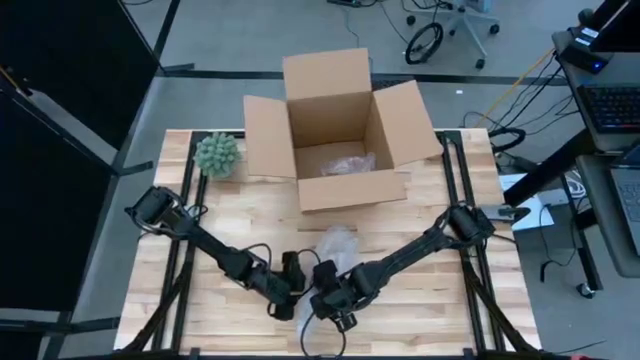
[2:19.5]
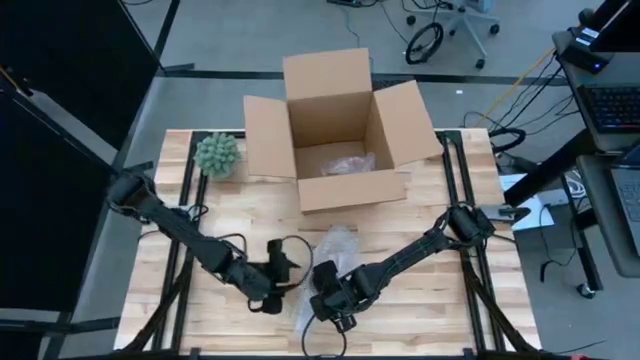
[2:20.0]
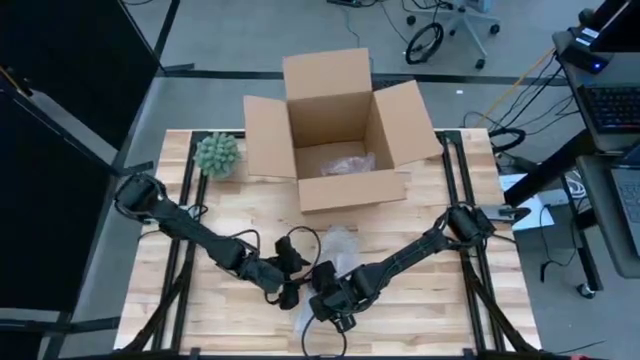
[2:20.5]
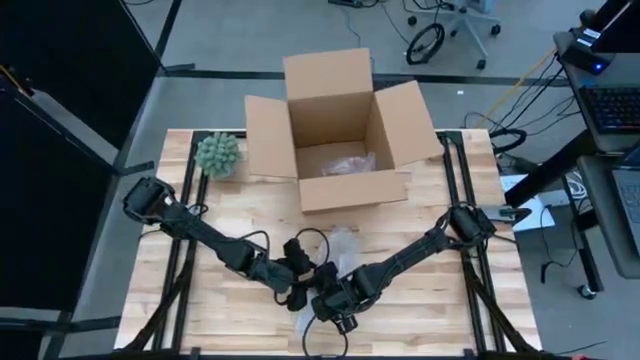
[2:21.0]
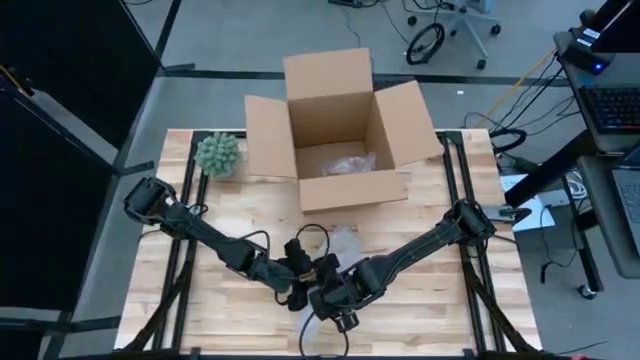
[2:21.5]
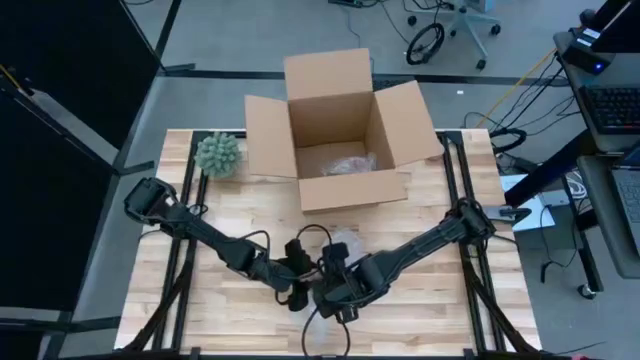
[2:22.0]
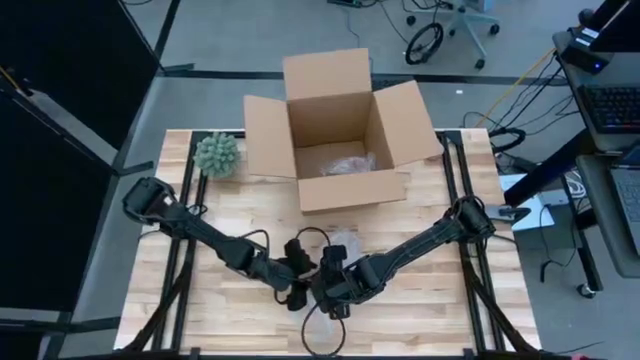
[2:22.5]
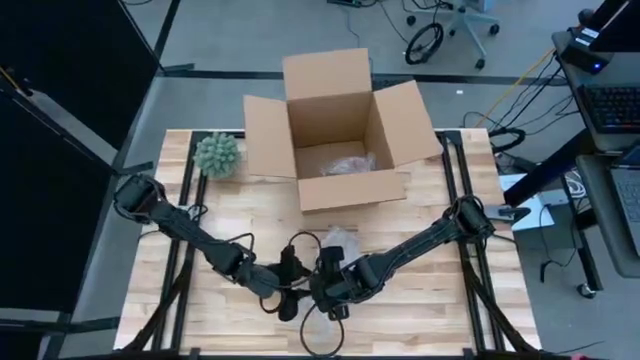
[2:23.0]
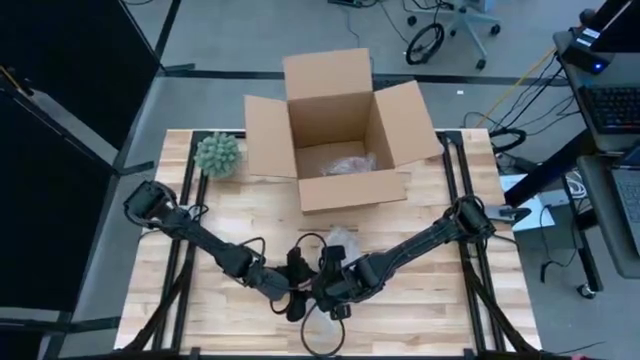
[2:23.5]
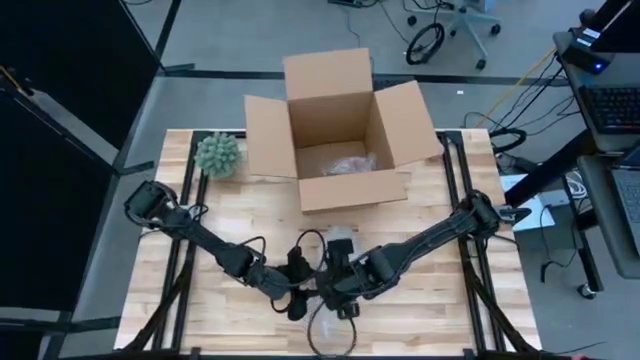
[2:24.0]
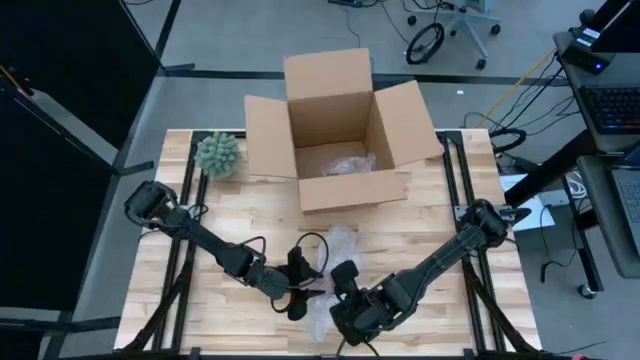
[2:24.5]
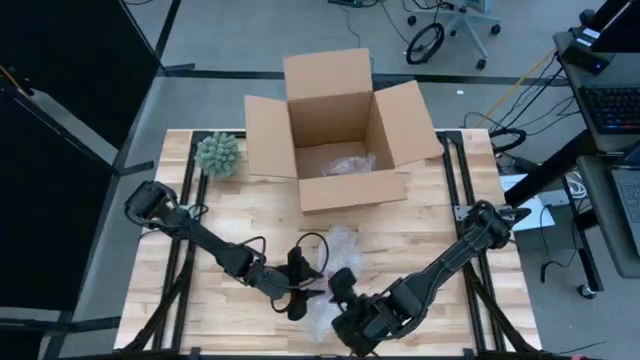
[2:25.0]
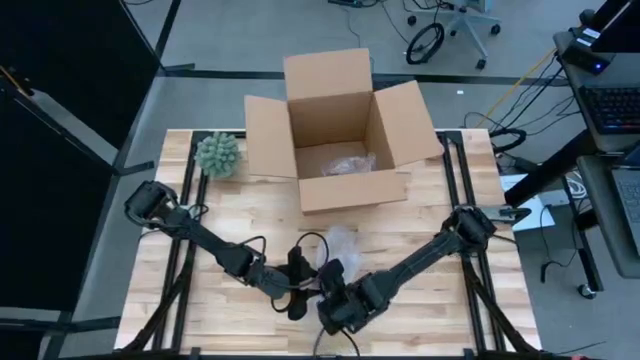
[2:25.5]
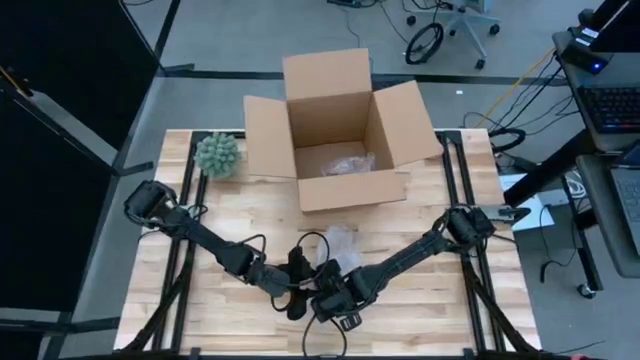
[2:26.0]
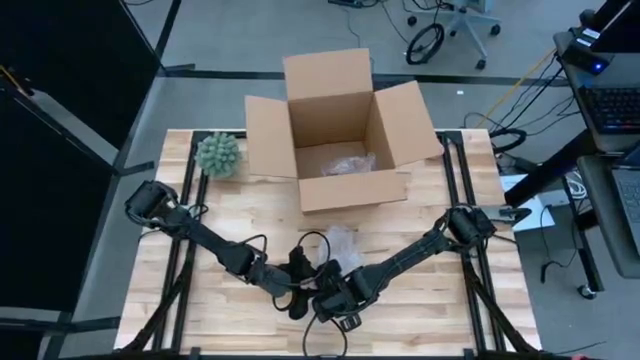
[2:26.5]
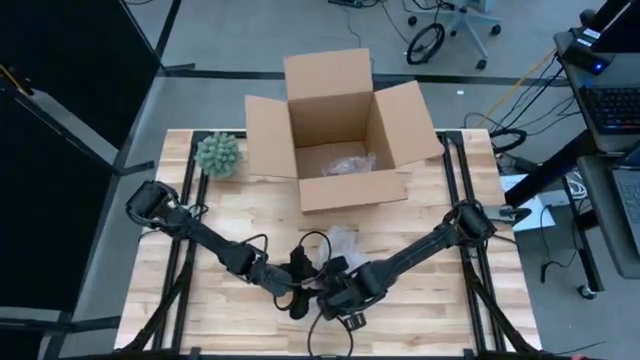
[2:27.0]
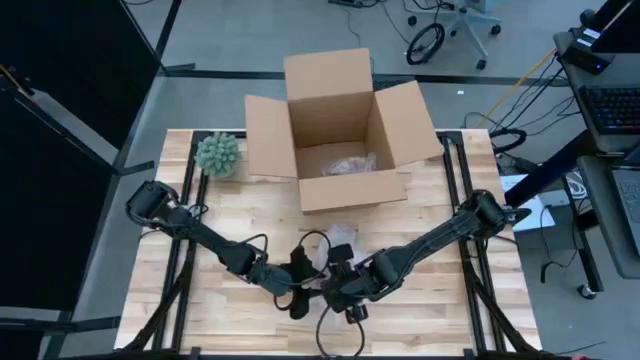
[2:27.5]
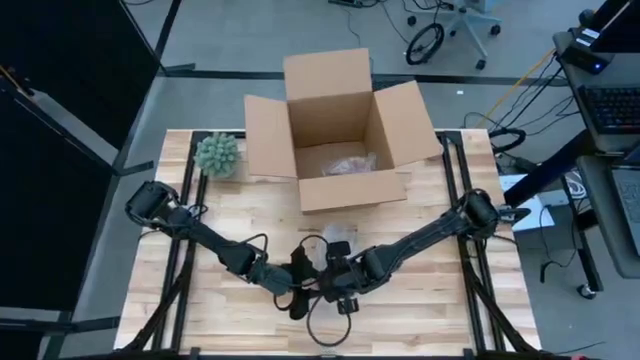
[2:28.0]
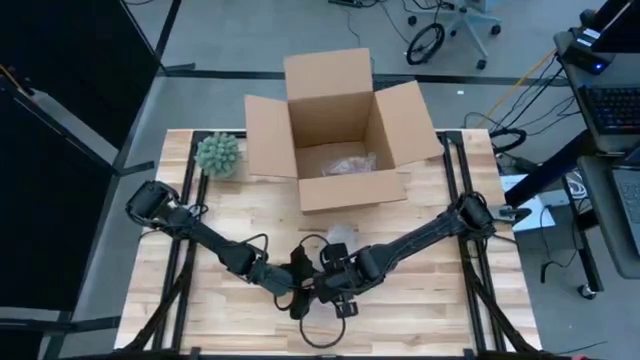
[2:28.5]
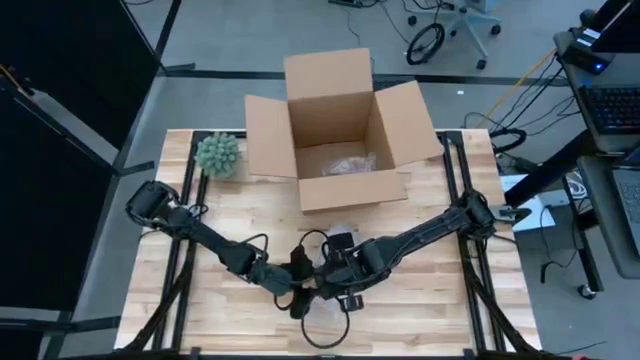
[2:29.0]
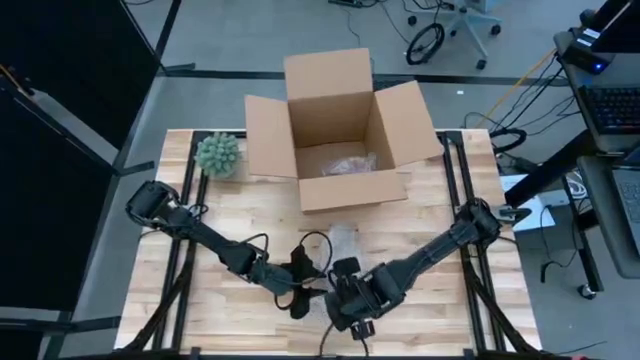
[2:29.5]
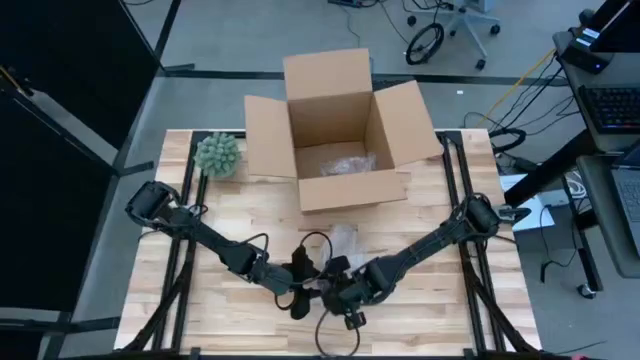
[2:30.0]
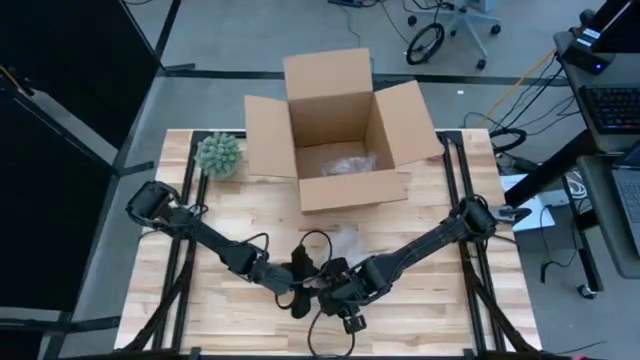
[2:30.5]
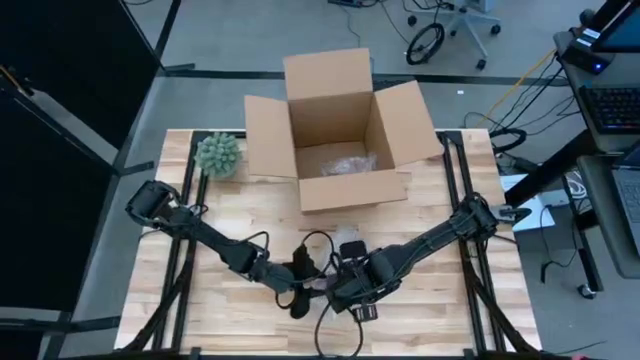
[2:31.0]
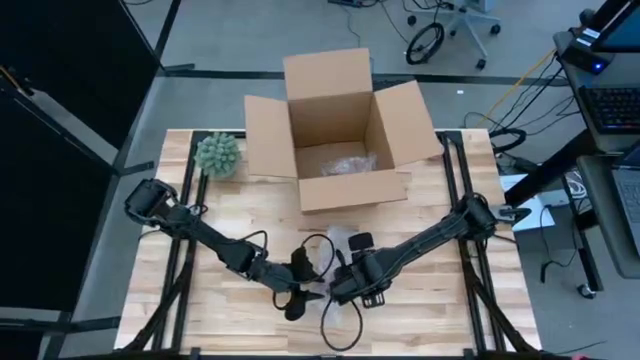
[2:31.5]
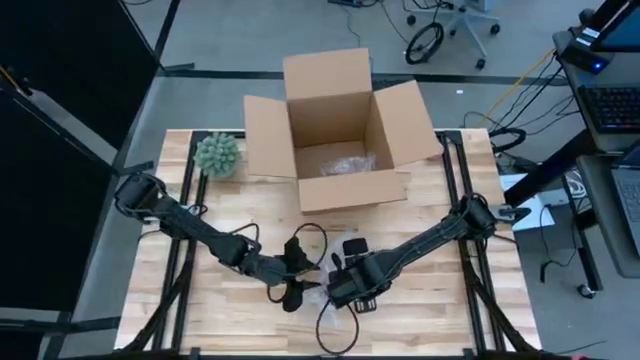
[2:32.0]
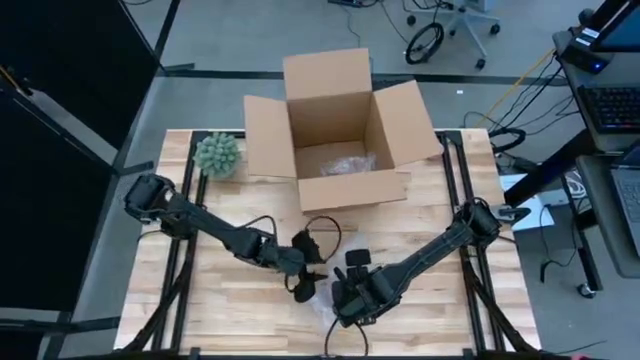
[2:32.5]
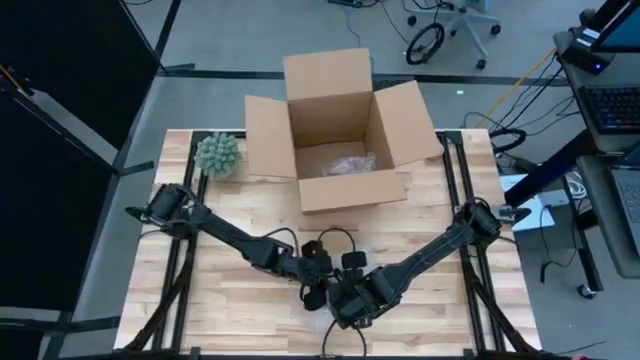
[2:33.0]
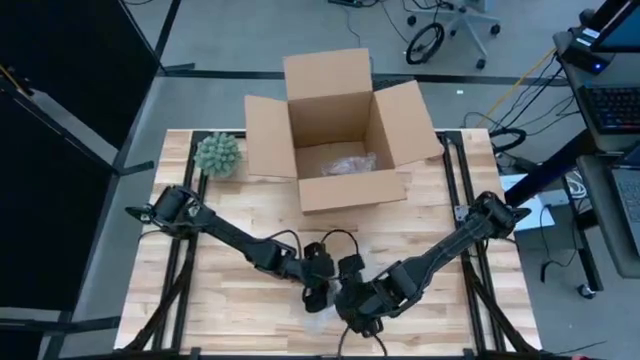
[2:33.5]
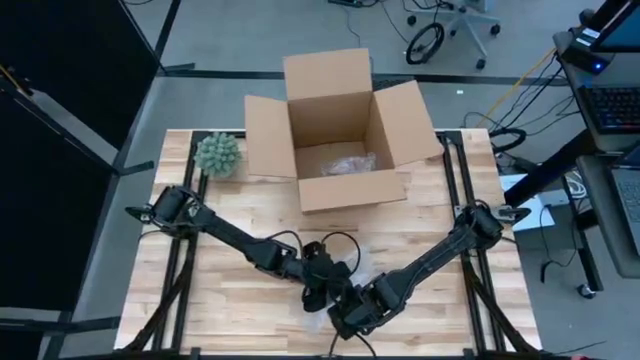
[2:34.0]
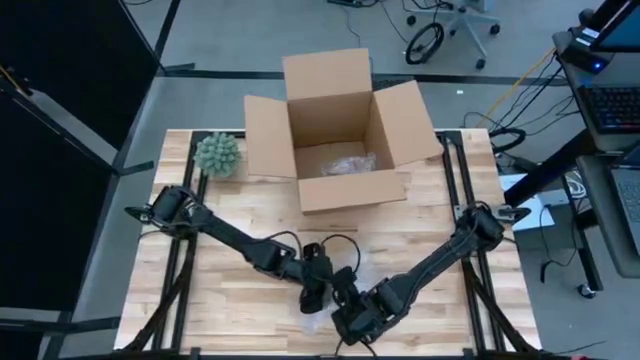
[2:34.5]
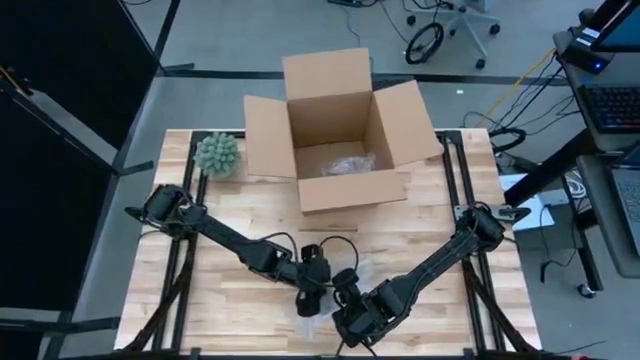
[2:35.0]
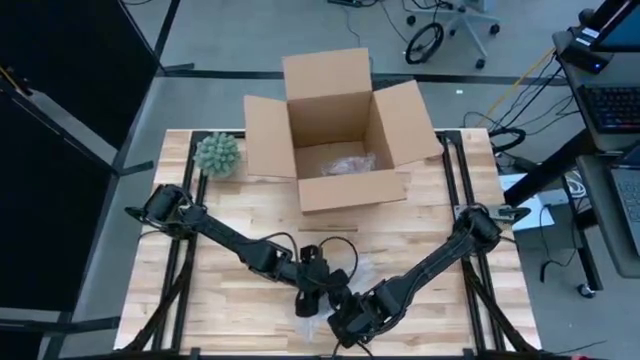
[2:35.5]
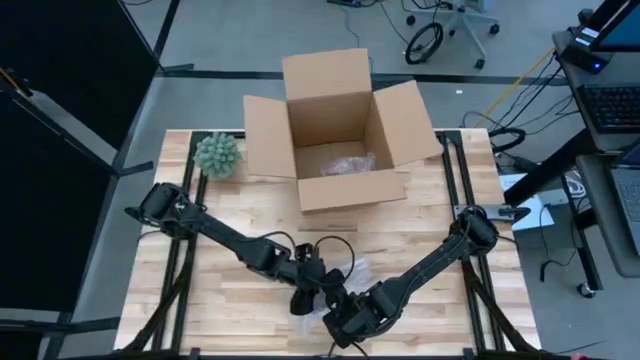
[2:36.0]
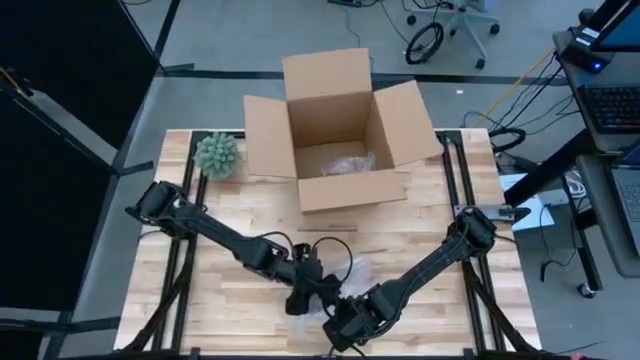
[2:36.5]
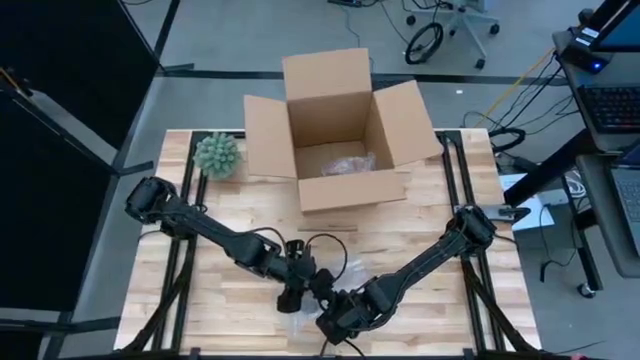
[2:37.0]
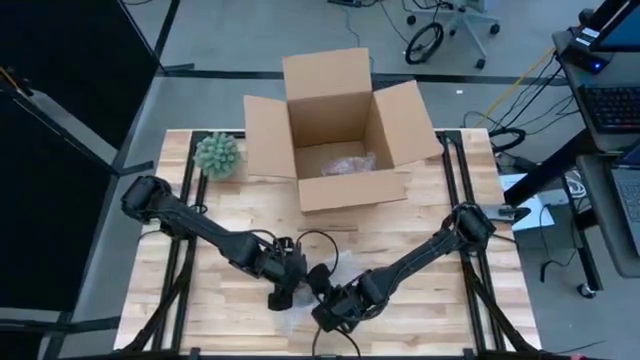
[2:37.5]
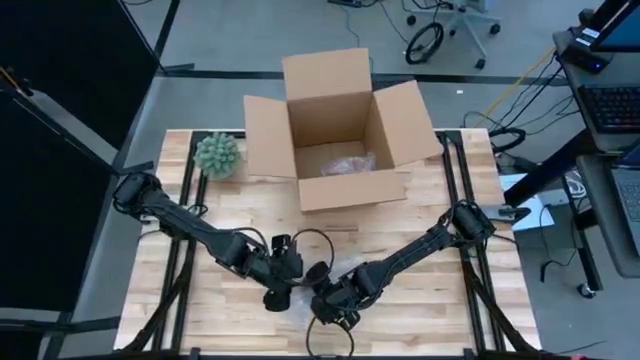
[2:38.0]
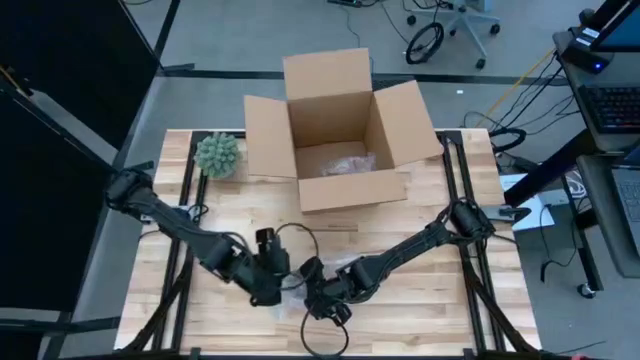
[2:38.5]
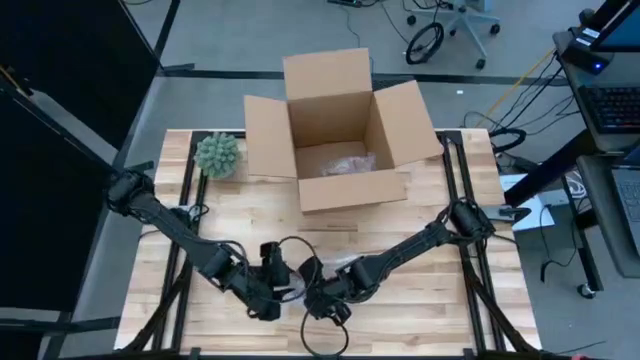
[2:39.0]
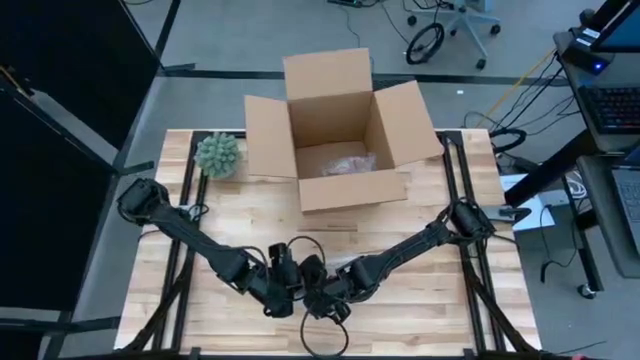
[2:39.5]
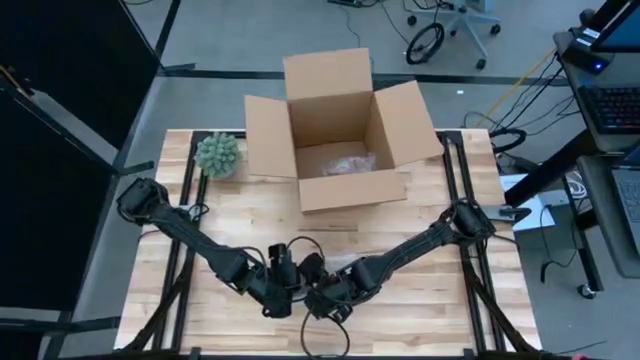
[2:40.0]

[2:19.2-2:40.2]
Task: wrap mug
Wrap the pink mug with bubble wrap
